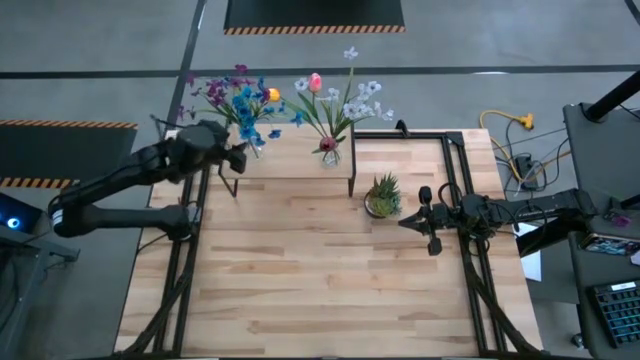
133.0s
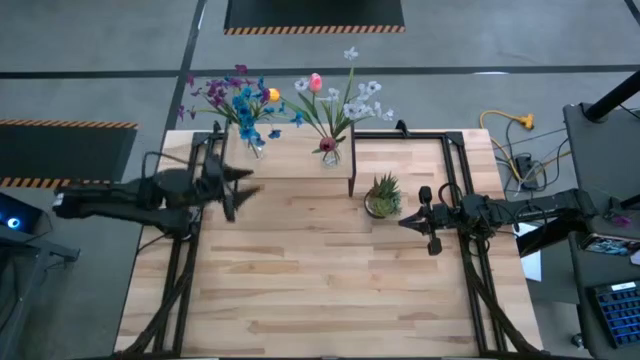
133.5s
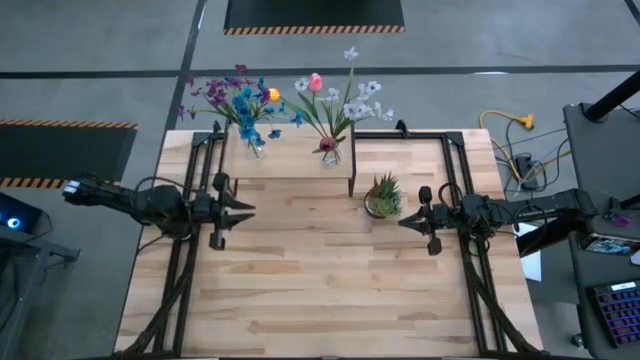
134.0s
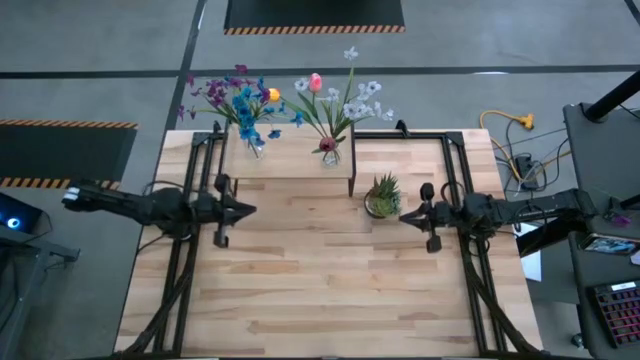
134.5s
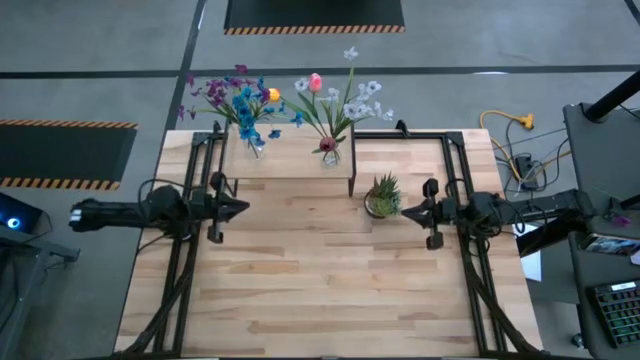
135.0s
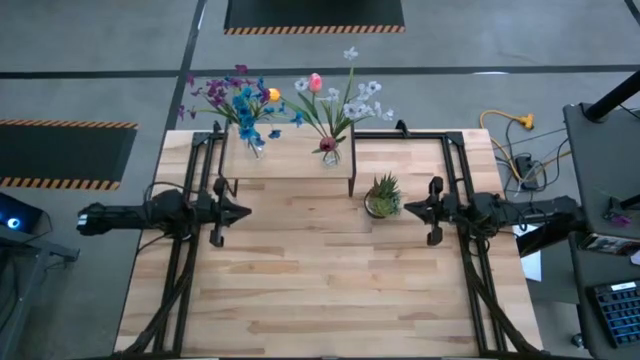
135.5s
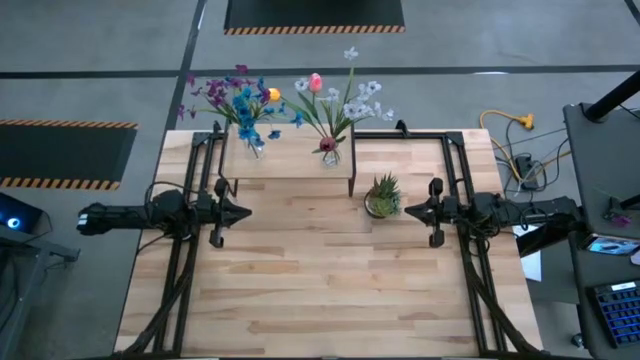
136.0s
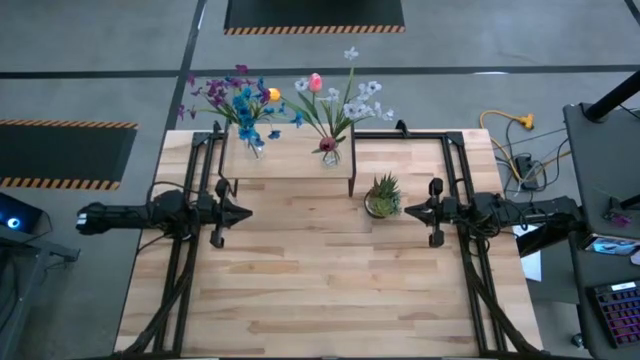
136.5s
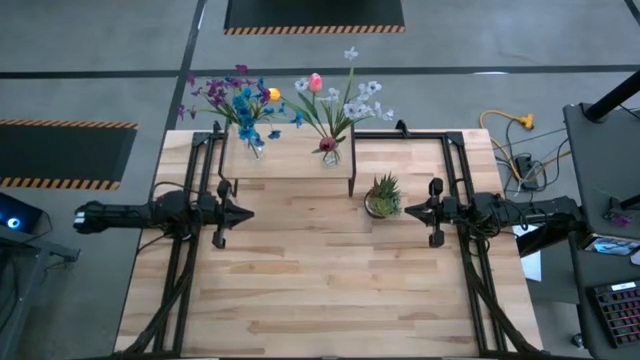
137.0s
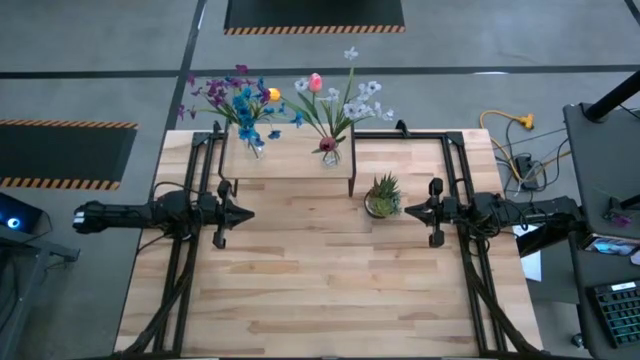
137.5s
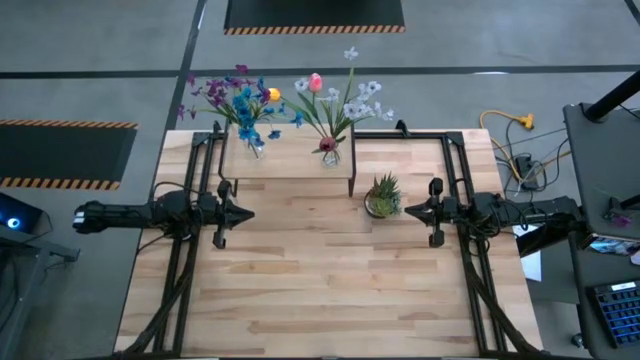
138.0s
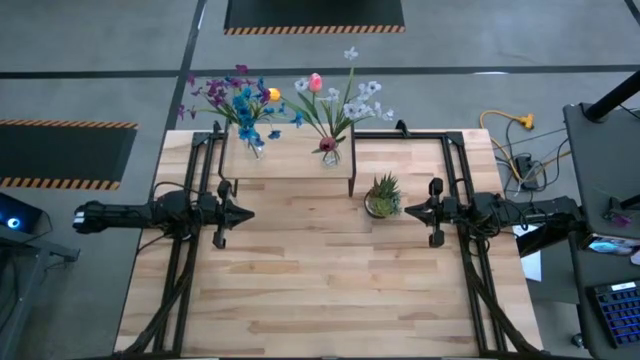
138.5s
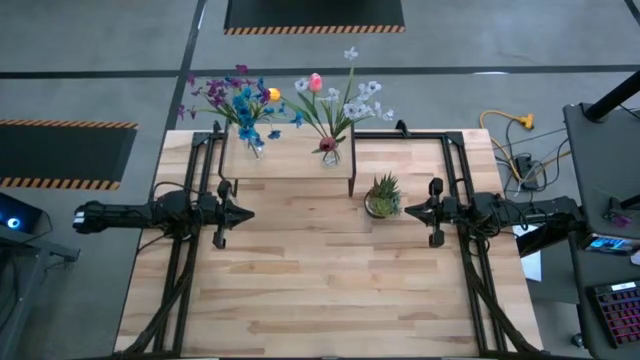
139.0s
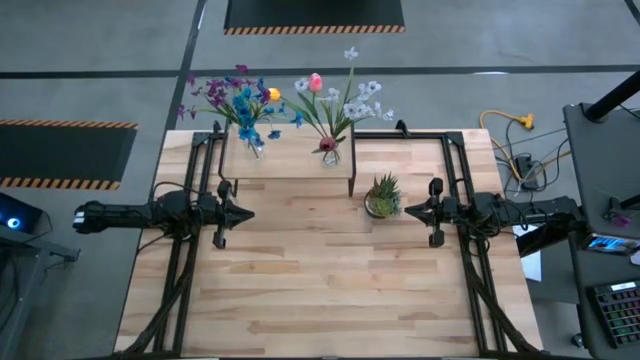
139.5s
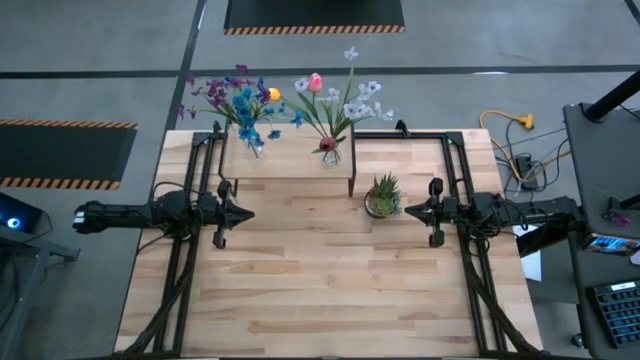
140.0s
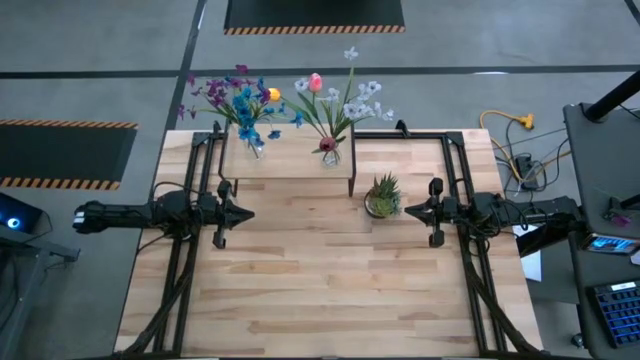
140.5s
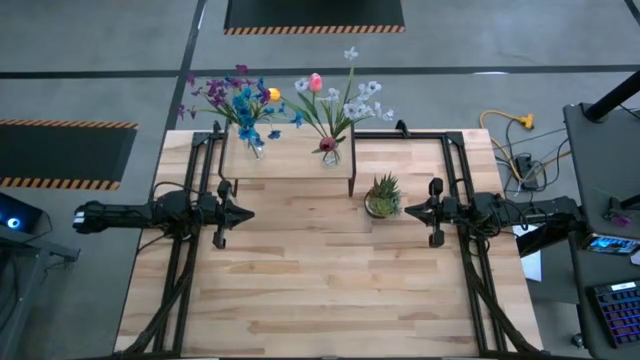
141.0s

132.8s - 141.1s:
Task: Pick and place flowers into a vace then onto a shelf
Return to Home Position

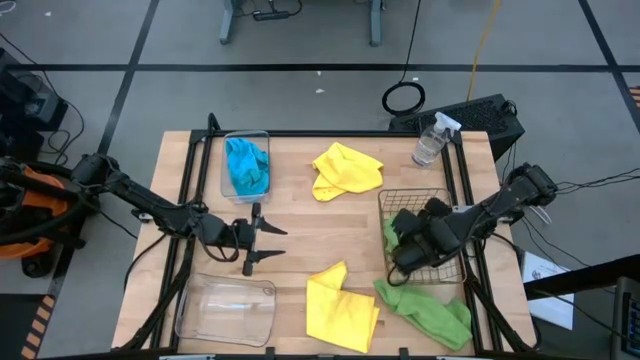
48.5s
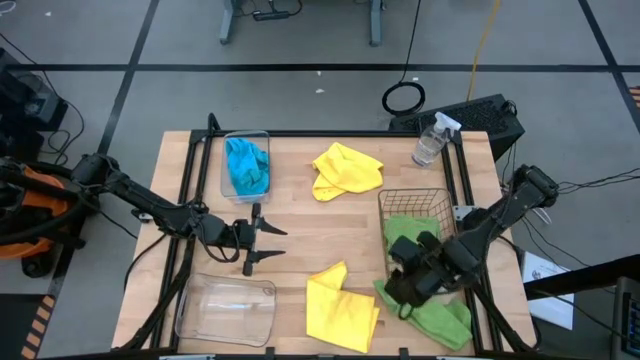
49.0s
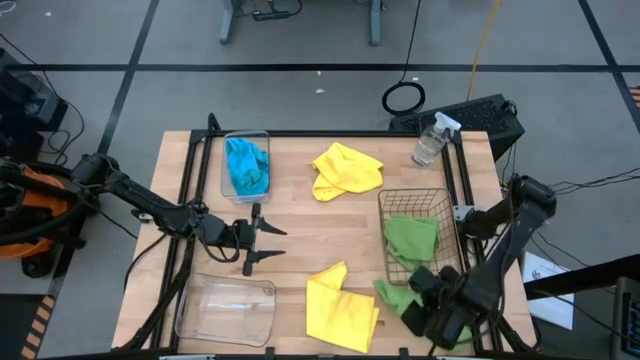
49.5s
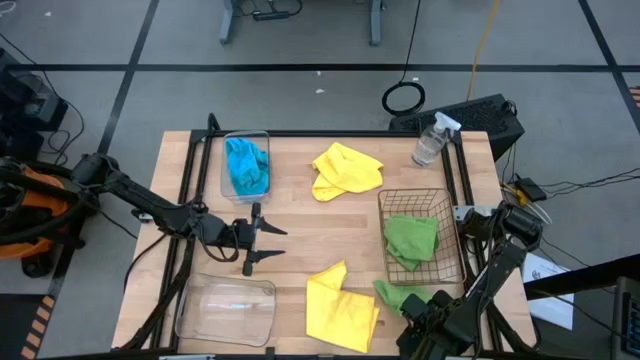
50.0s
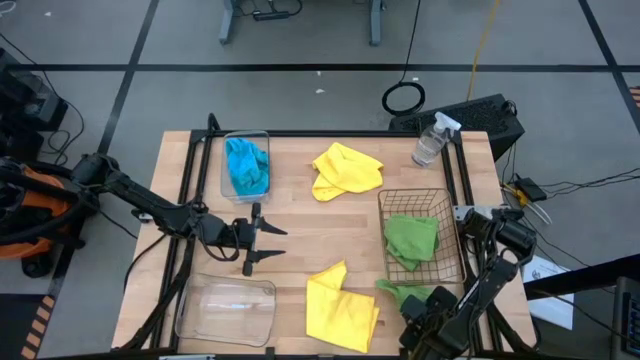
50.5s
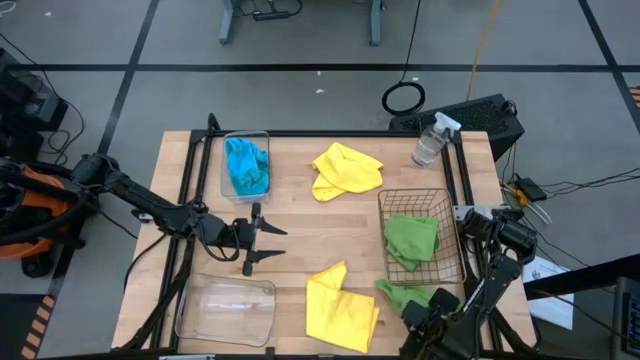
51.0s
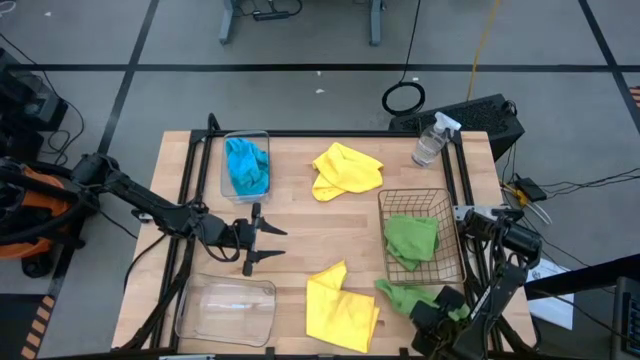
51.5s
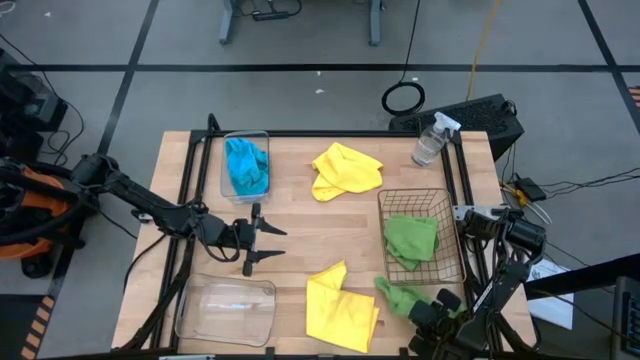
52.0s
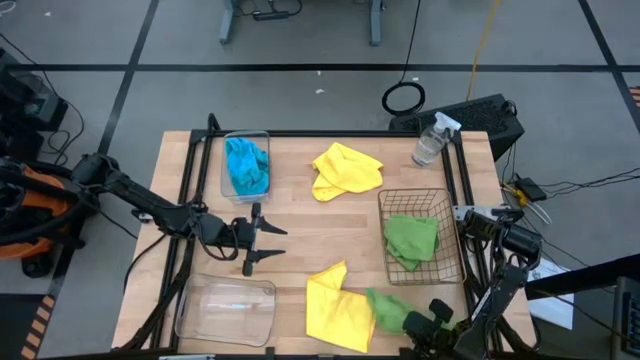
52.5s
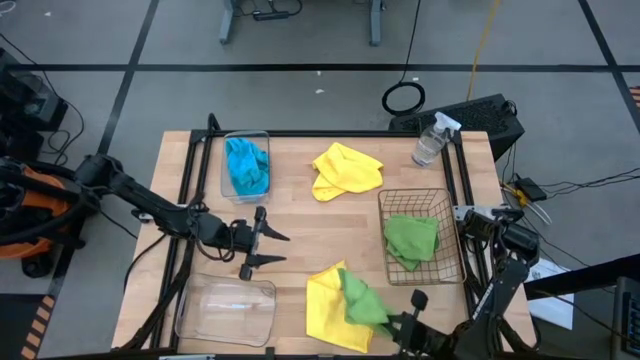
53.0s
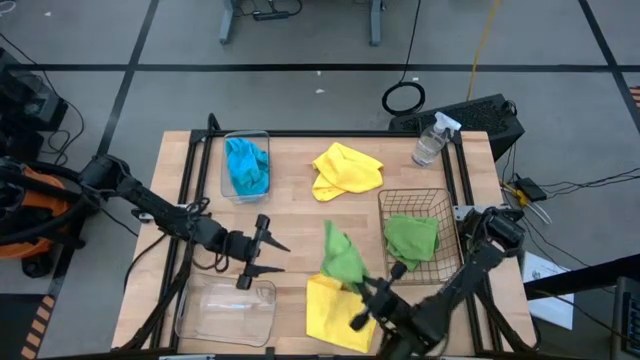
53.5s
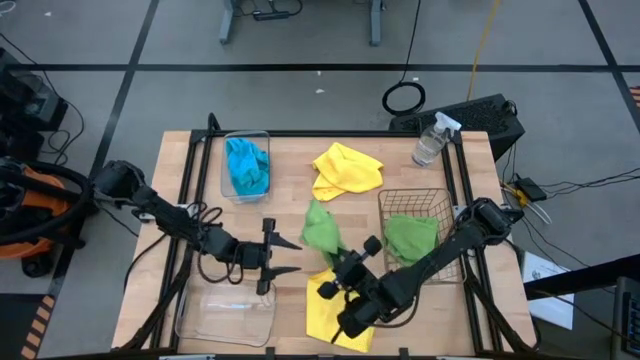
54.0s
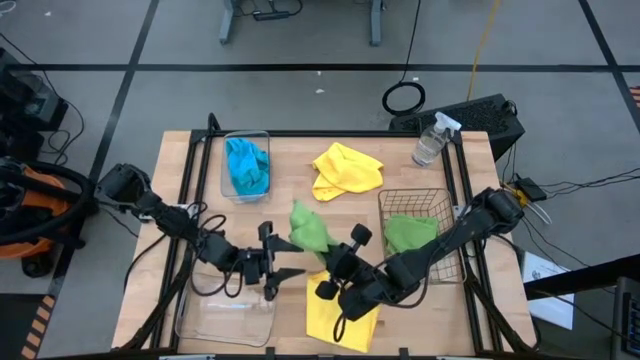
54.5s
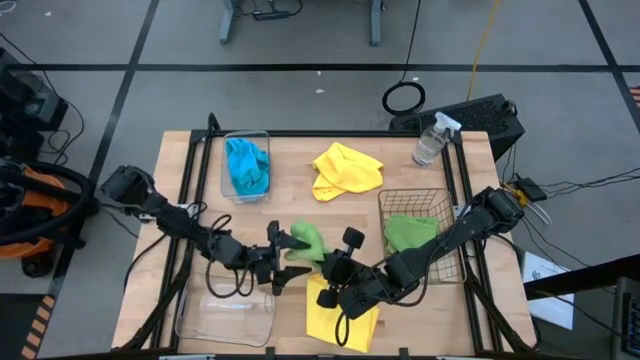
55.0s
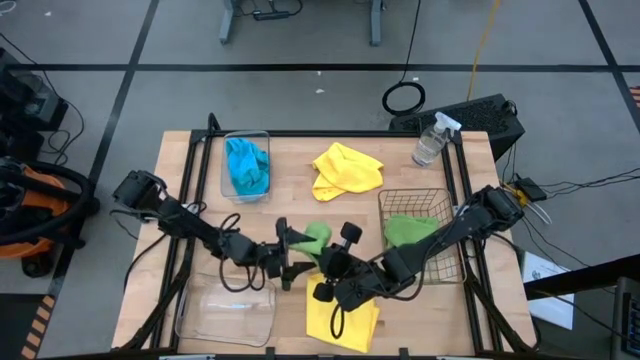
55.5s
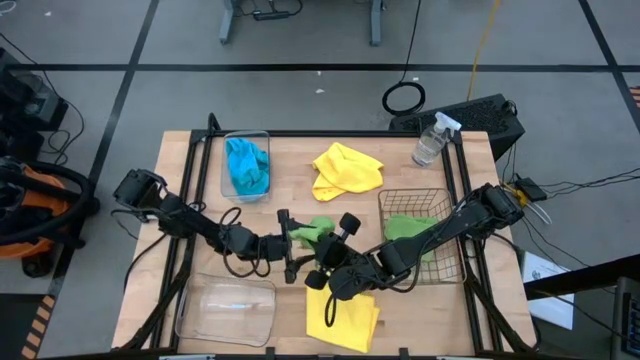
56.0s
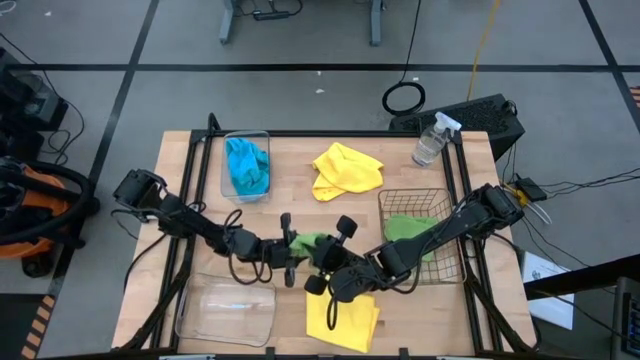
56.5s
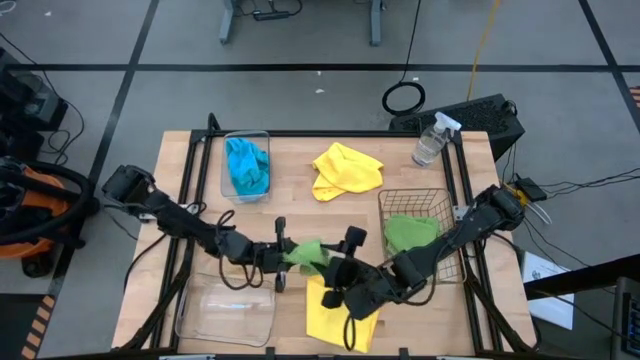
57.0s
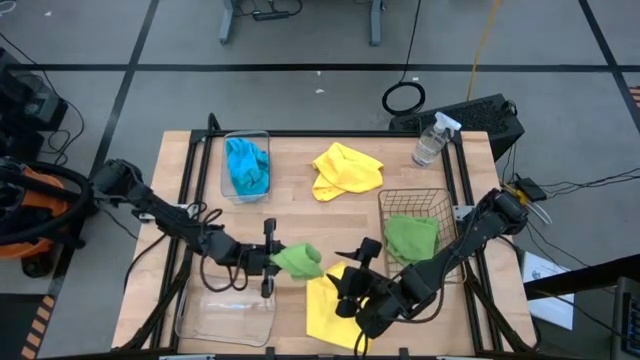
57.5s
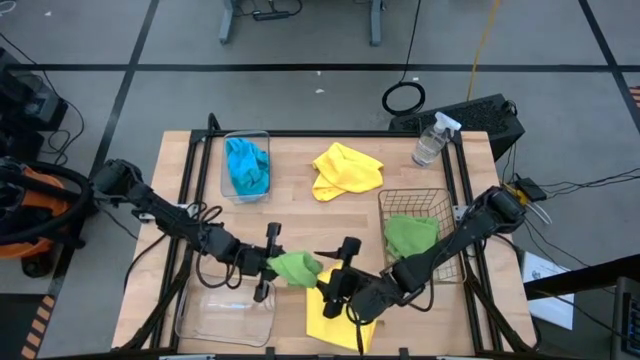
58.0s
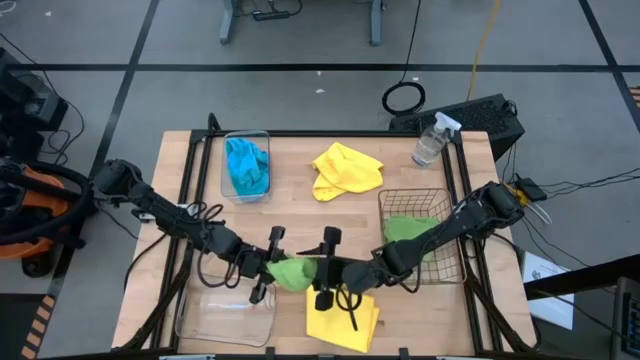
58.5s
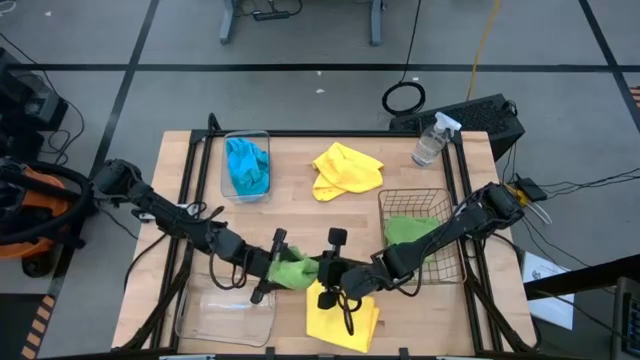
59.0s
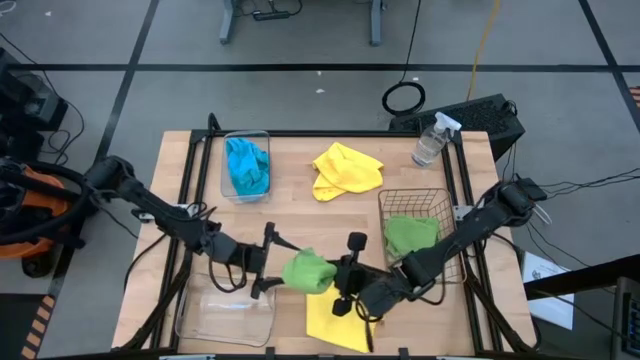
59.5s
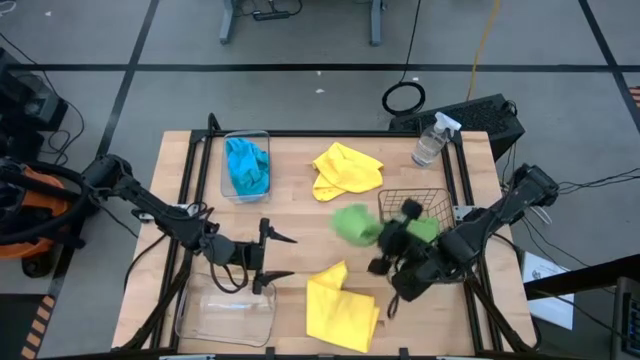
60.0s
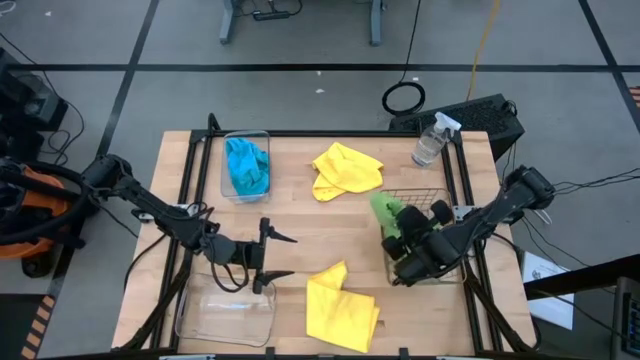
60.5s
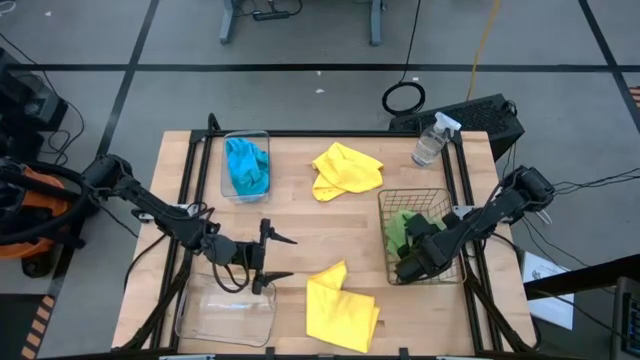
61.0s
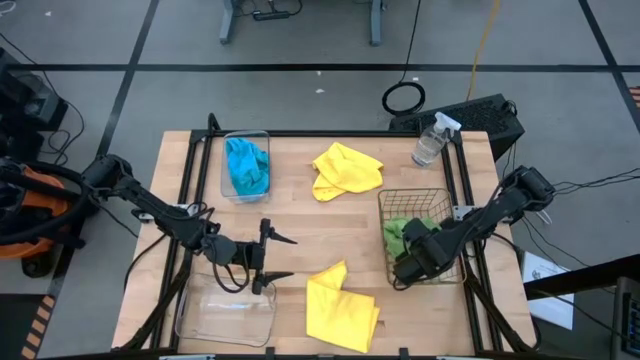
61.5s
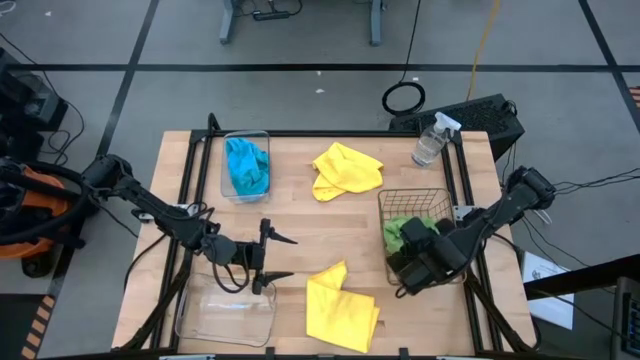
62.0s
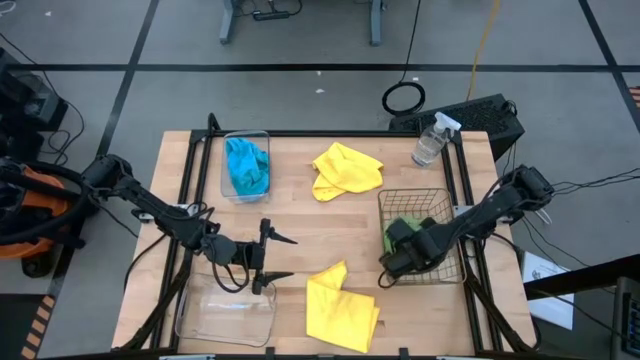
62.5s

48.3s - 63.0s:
Task: Sort microfiber towel by color & place in baskets
Put the green microfiber cloth into the wire basket
